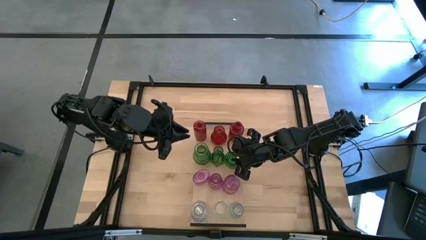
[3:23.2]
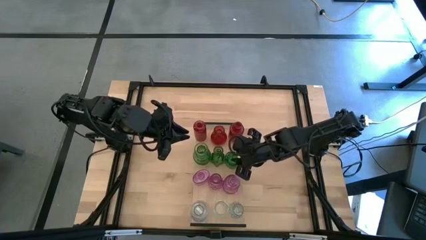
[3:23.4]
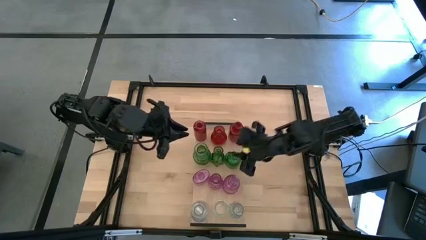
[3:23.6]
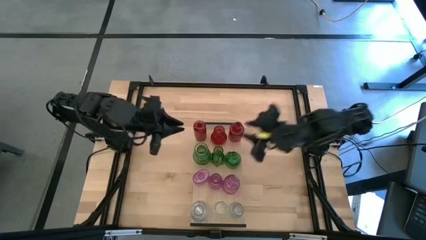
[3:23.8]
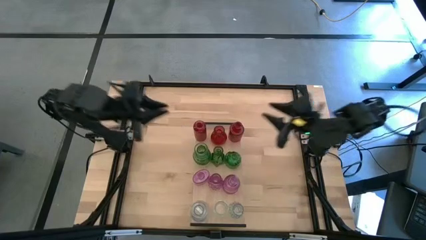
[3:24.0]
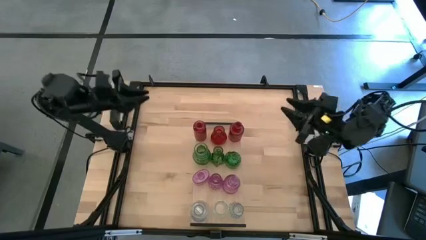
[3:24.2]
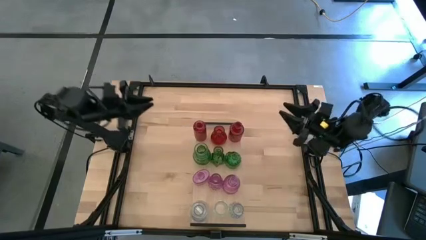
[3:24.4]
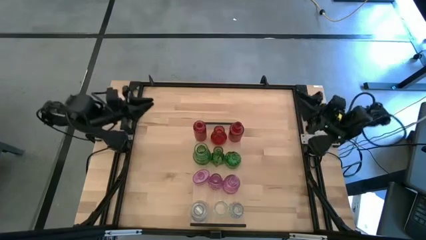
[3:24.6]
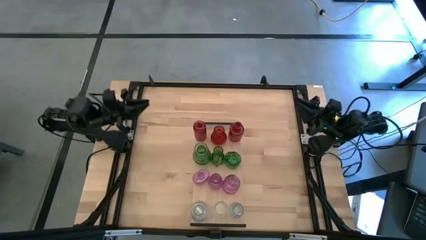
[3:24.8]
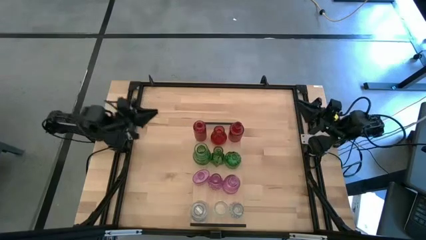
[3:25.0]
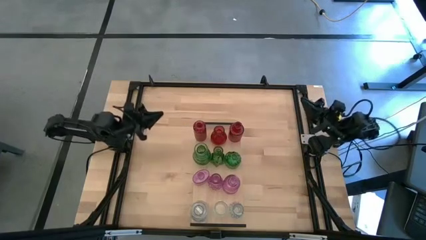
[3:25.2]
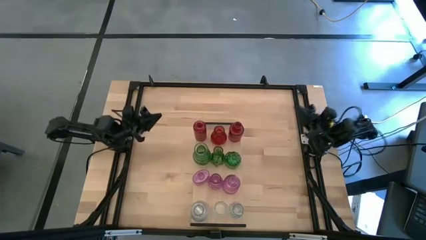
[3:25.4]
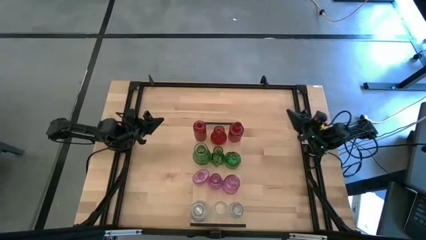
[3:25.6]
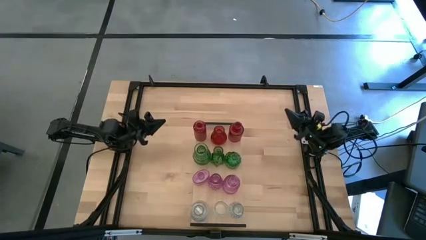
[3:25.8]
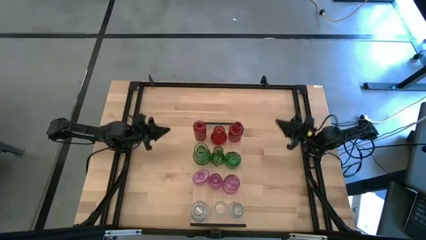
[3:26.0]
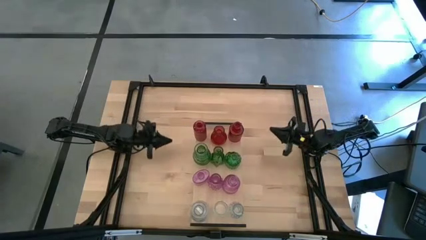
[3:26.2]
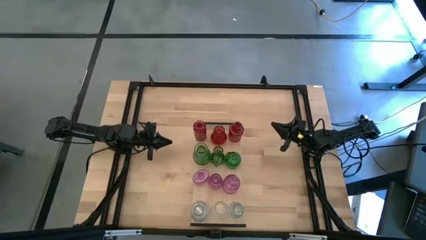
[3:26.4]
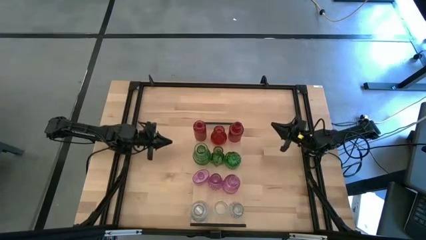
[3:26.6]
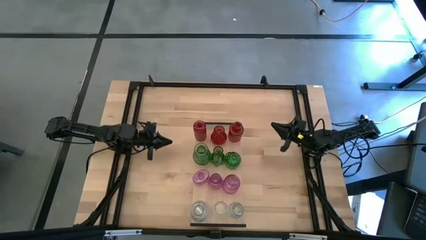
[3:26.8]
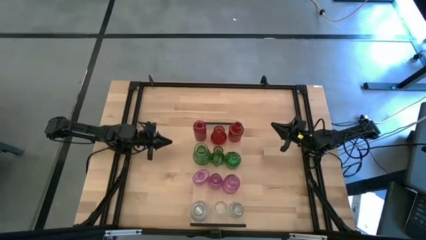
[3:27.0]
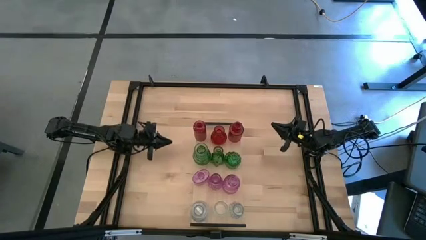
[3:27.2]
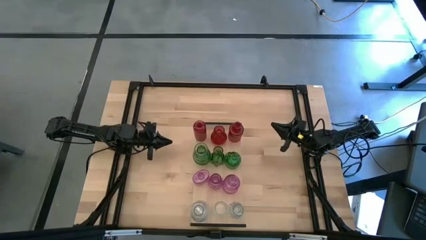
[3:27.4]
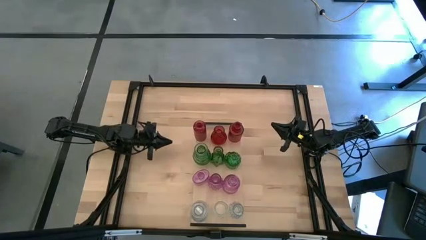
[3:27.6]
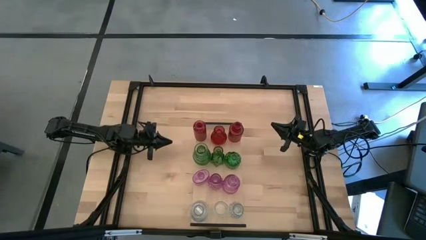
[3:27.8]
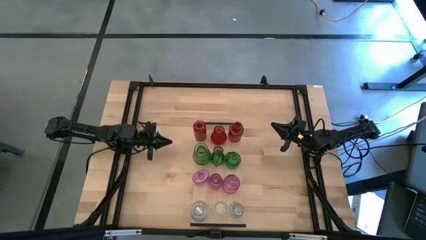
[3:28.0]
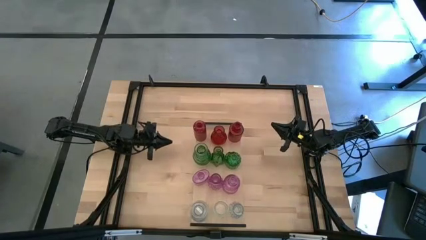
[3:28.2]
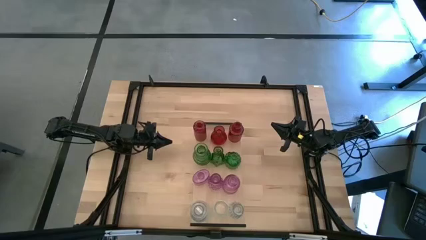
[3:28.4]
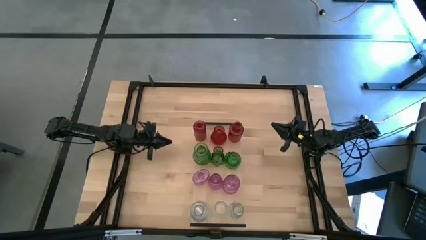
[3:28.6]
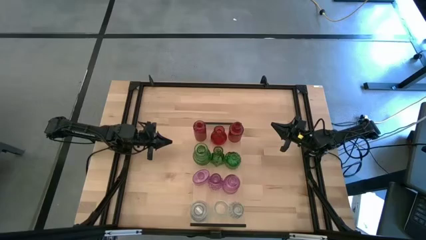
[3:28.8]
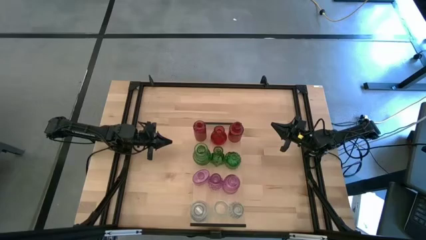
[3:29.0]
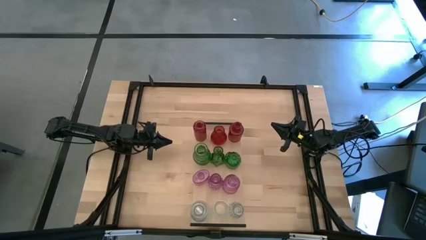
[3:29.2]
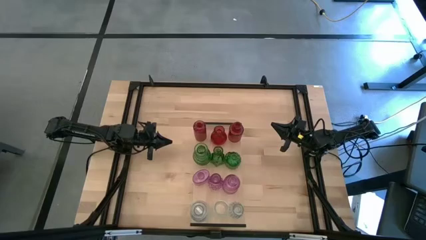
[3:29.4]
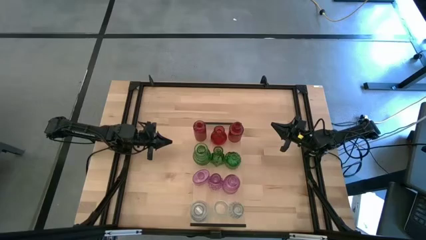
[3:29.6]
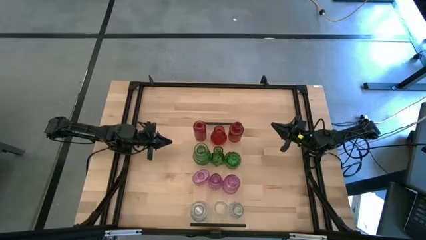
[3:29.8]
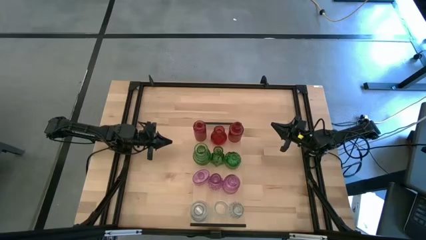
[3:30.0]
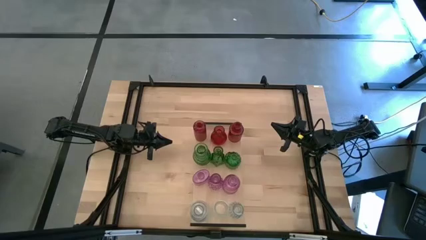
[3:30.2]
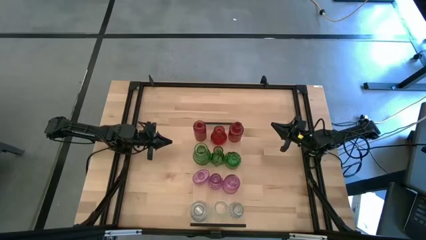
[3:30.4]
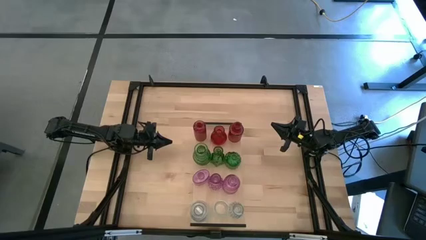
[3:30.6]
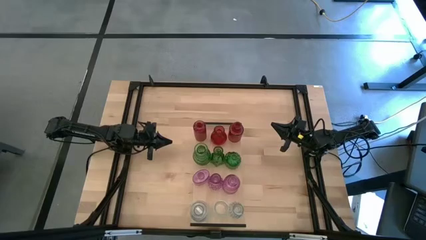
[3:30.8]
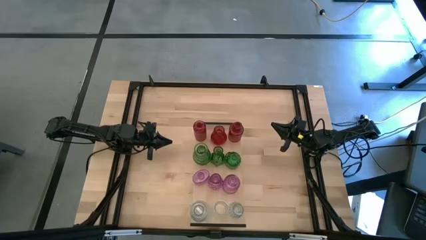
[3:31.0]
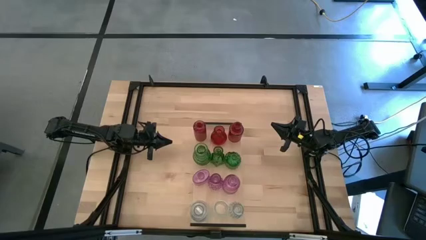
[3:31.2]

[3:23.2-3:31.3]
Task: sort vases onto shelf
Return to Home Position

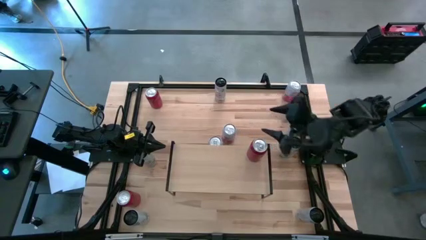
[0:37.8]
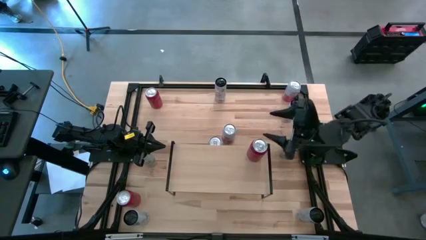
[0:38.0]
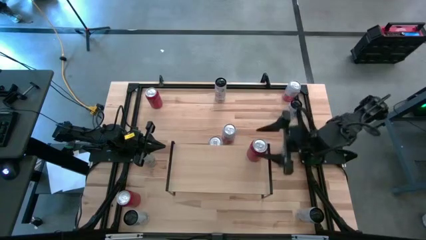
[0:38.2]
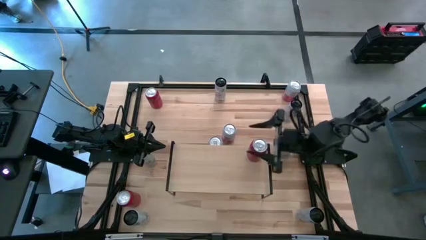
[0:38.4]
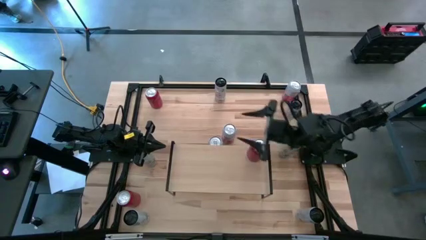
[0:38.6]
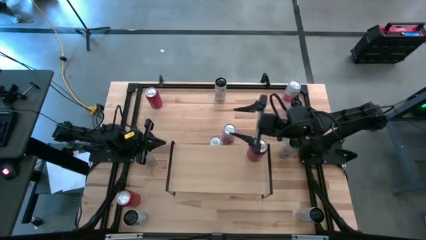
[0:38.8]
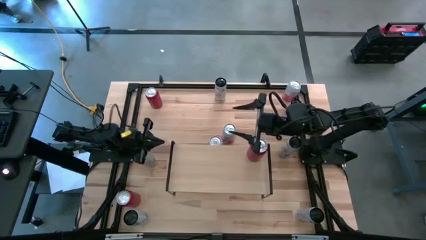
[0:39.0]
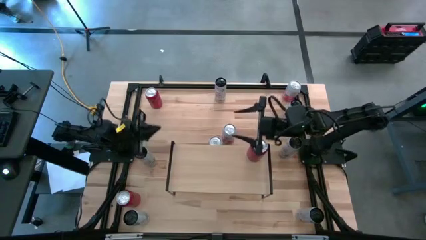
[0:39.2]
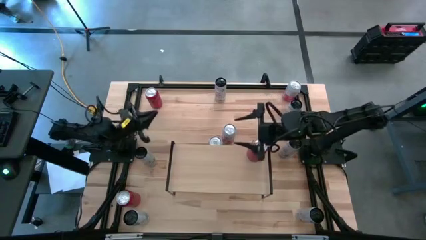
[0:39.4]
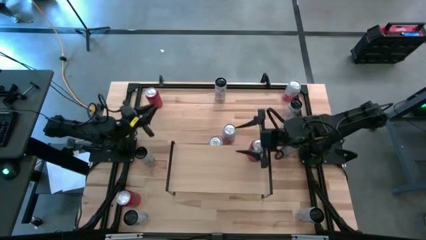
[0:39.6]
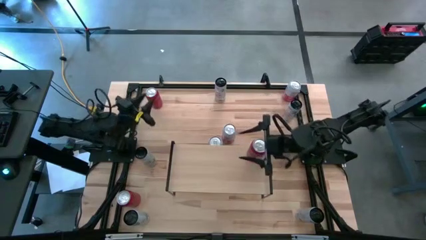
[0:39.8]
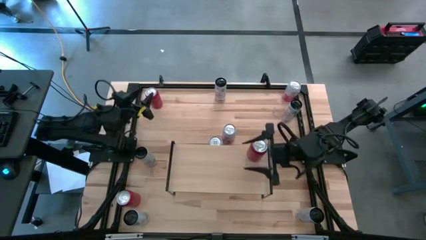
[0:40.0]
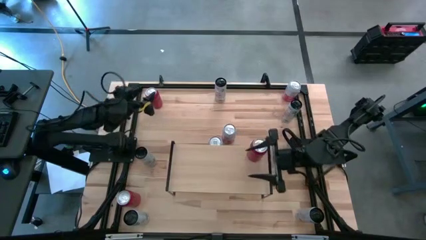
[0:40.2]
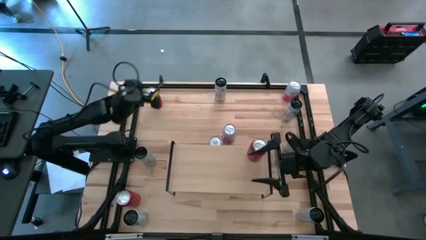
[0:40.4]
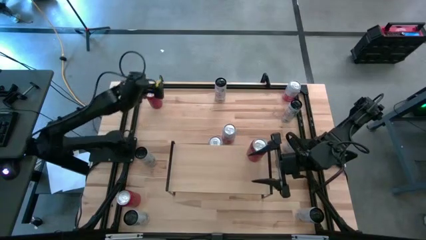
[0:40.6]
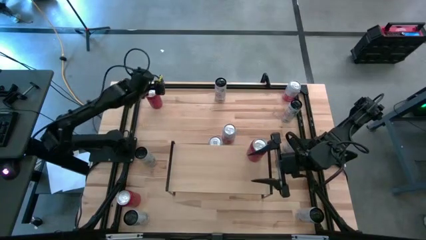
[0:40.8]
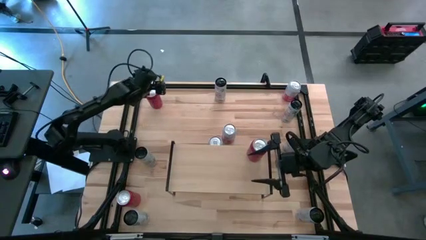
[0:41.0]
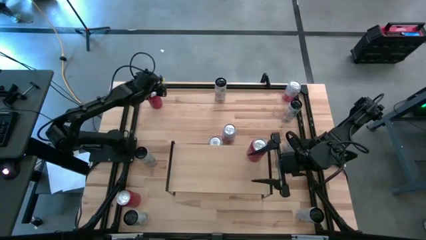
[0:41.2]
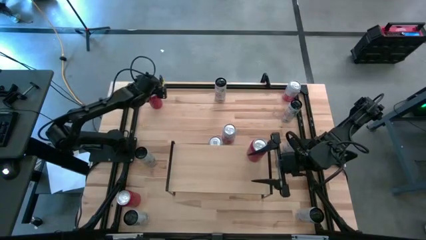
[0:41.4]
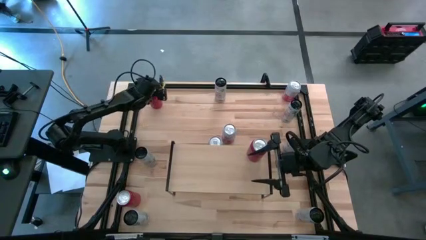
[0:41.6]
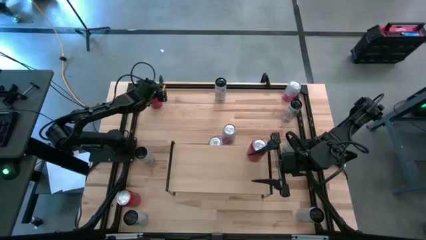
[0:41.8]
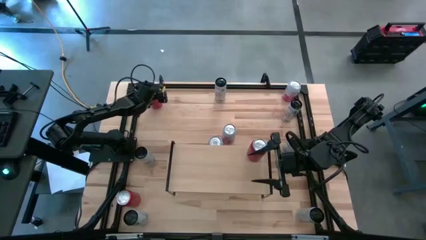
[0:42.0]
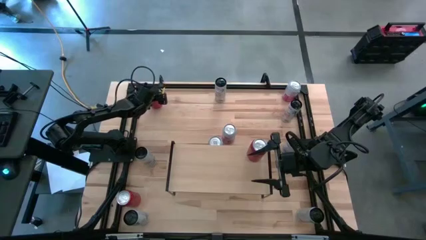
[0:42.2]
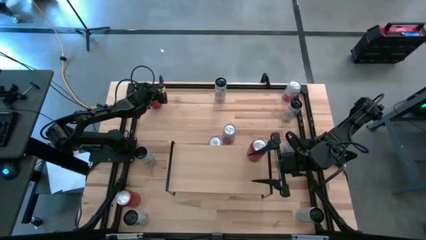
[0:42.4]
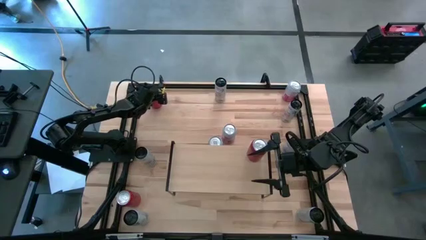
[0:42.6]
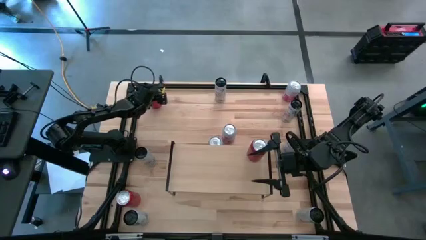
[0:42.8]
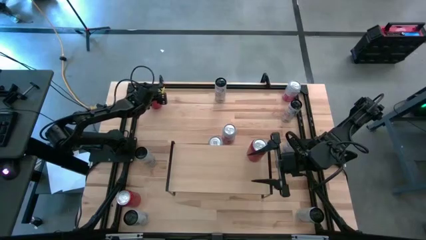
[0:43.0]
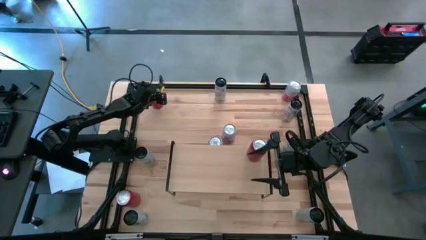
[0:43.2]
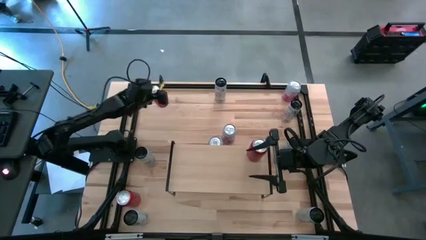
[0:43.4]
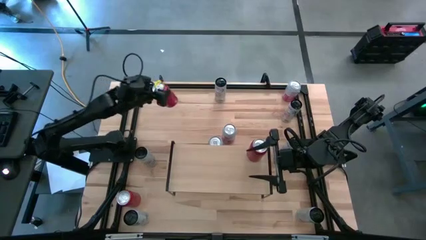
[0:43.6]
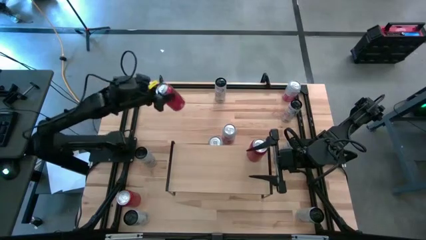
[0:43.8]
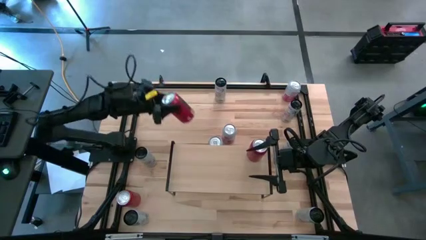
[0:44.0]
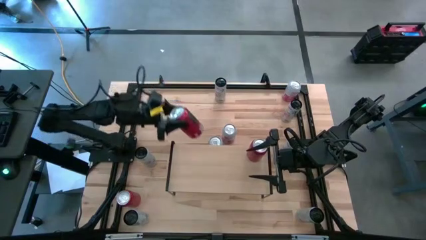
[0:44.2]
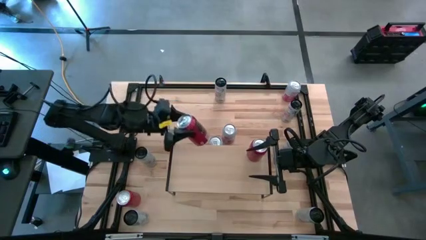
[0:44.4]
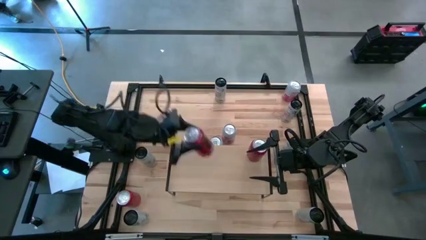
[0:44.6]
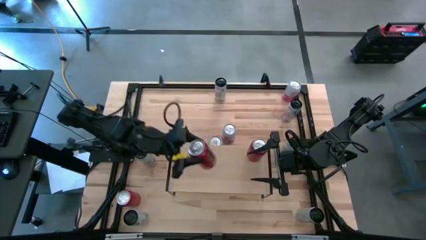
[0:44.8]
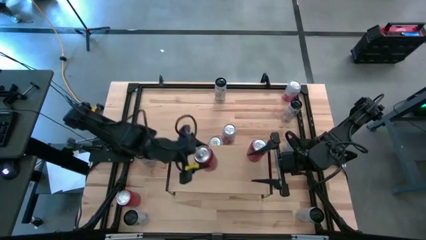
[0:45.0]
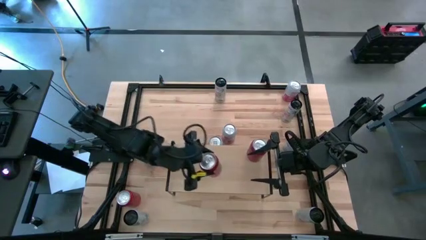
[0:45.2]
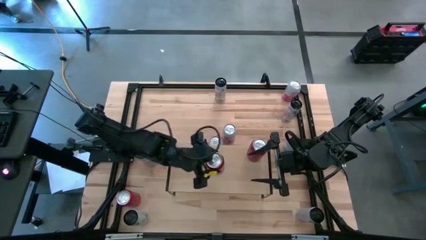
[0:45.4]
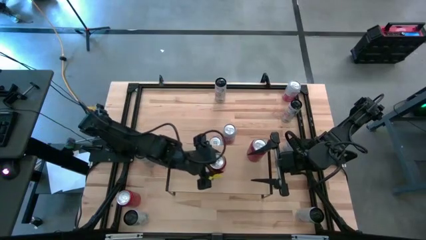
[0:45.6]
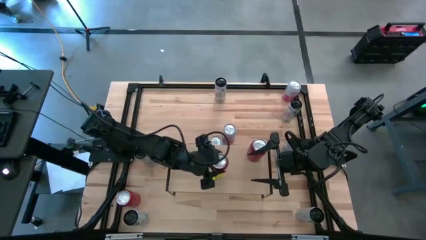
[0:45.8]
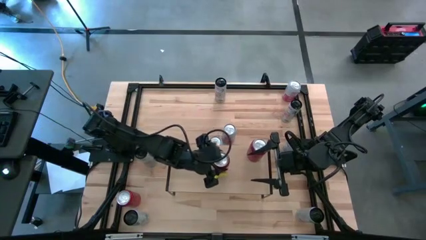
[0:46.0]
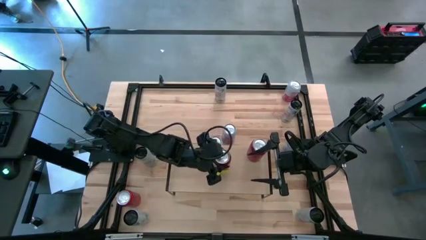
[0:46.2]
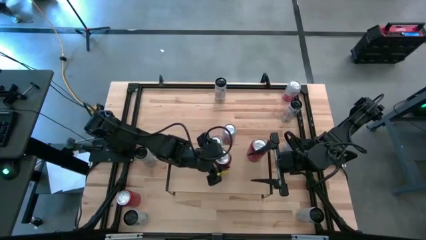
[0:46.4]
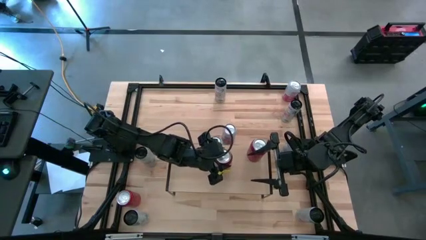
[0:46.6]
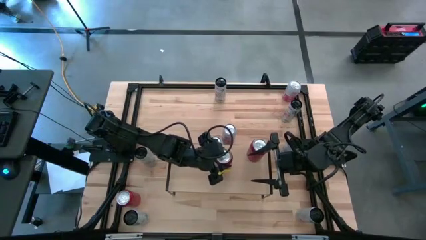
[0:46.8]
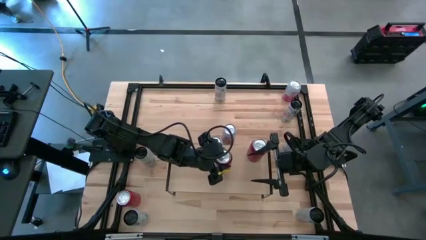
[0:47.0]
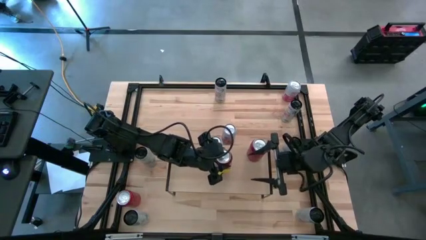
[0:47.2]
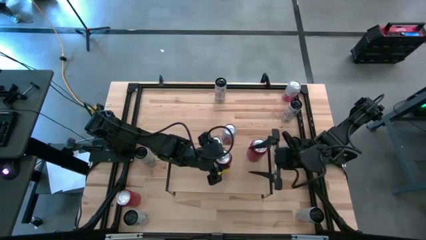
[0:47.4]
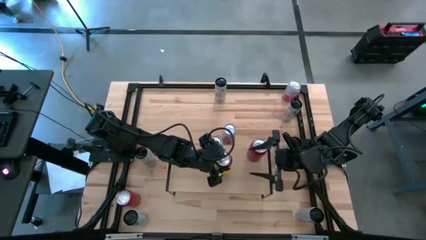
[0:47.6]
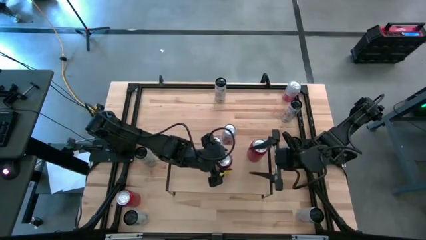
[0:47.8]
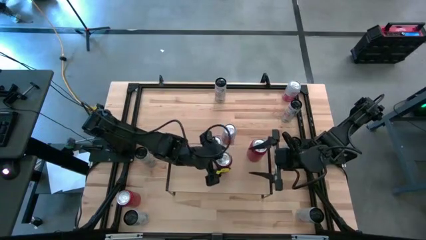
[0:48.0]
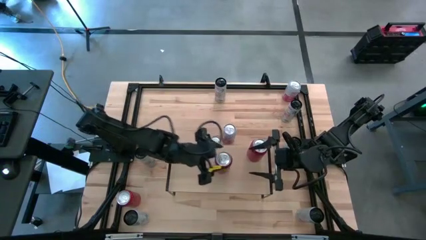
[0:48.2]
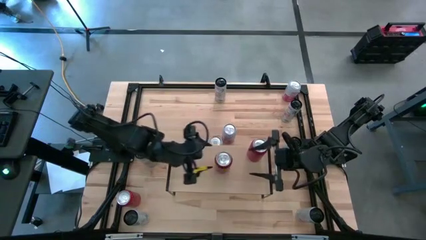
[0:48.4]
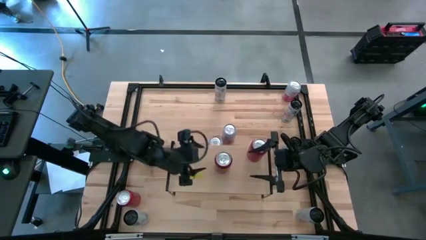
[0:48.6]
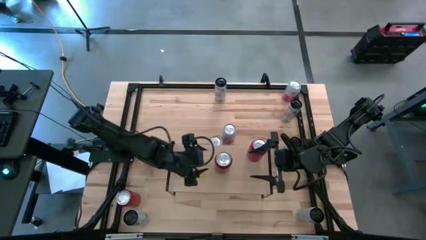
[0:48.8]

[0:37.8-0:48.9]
Task: Place canned beverage on shelf
Put the top red-black soda can on the shelf aligned with the other red-black soda cans
